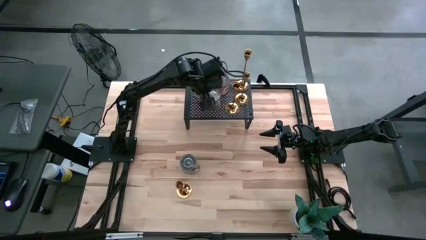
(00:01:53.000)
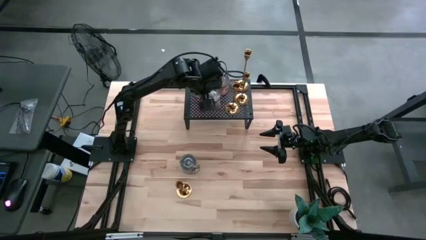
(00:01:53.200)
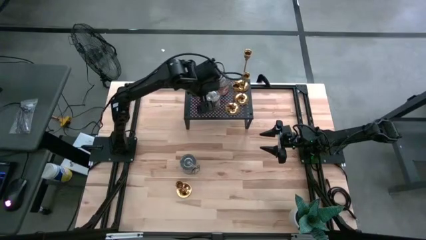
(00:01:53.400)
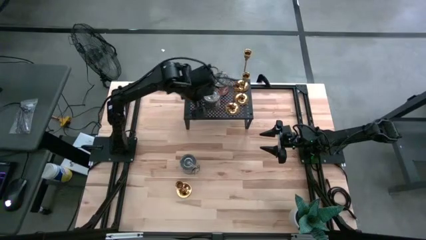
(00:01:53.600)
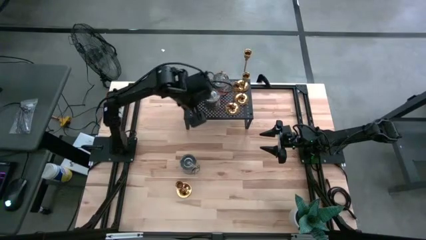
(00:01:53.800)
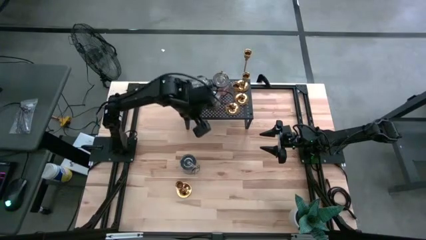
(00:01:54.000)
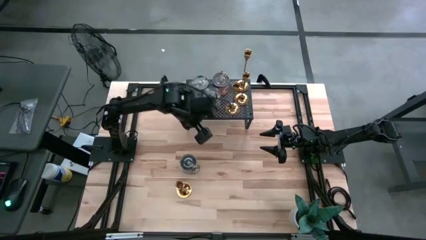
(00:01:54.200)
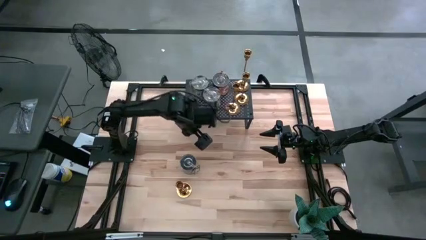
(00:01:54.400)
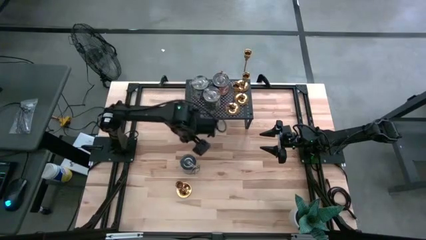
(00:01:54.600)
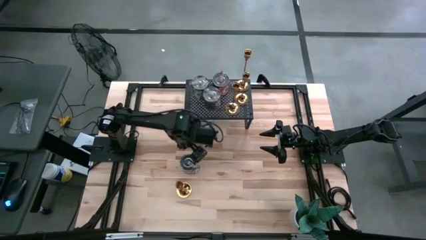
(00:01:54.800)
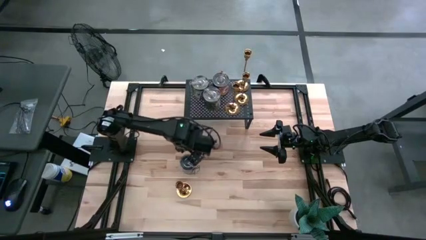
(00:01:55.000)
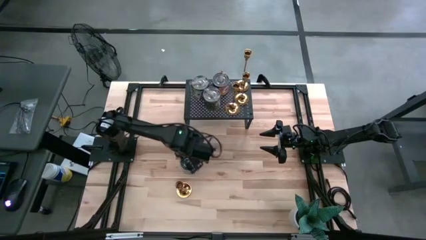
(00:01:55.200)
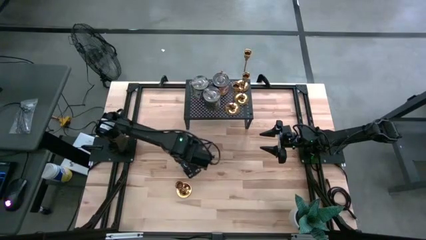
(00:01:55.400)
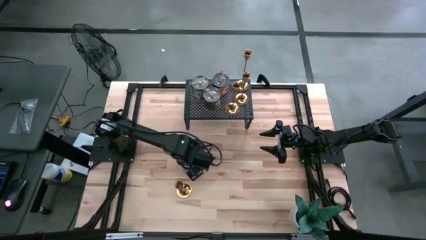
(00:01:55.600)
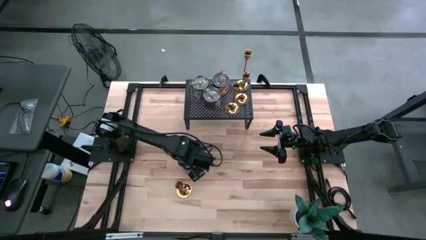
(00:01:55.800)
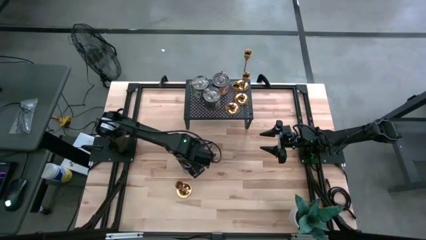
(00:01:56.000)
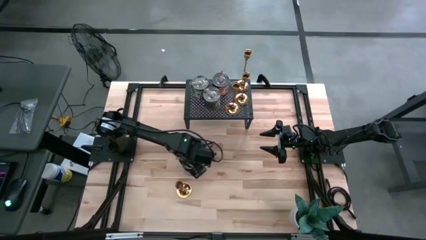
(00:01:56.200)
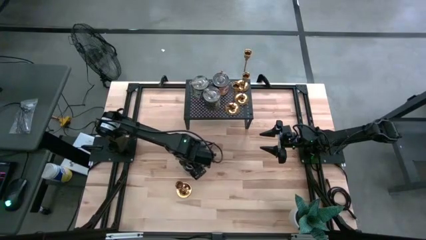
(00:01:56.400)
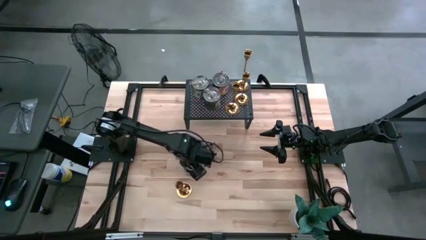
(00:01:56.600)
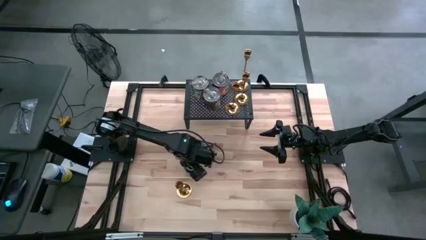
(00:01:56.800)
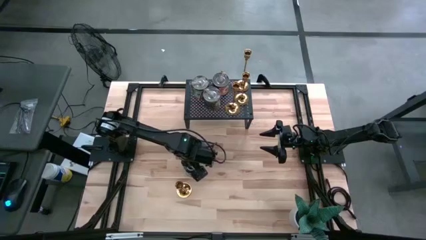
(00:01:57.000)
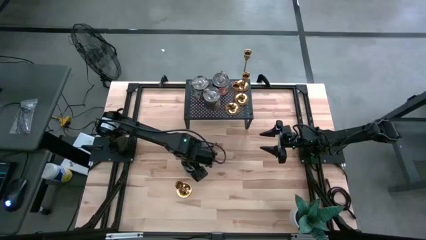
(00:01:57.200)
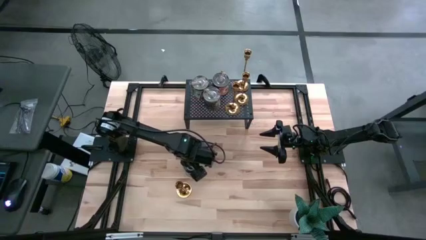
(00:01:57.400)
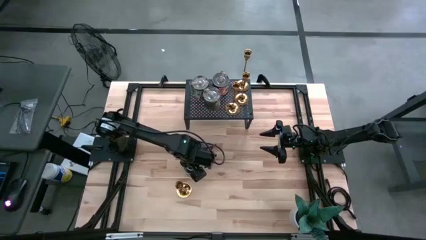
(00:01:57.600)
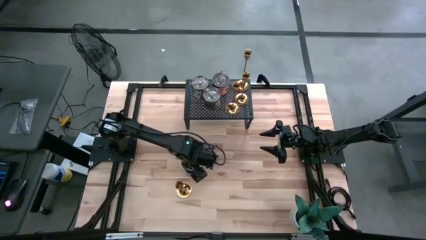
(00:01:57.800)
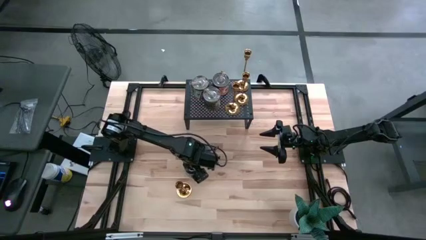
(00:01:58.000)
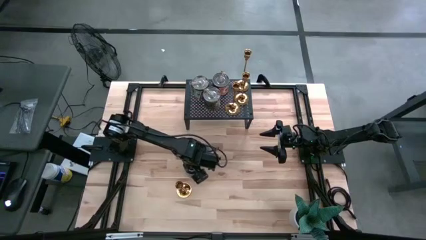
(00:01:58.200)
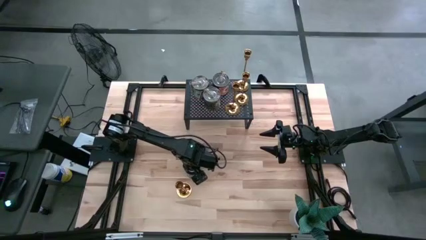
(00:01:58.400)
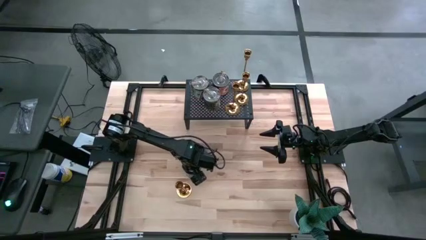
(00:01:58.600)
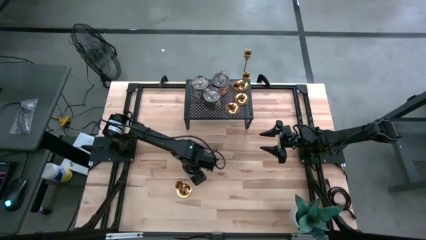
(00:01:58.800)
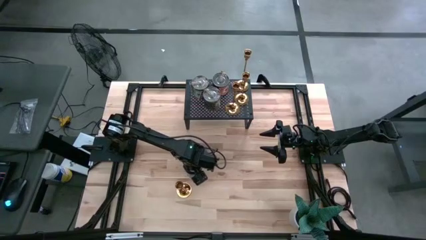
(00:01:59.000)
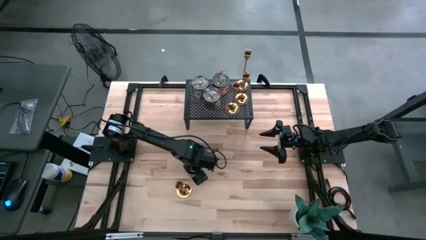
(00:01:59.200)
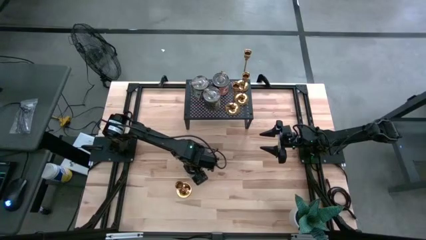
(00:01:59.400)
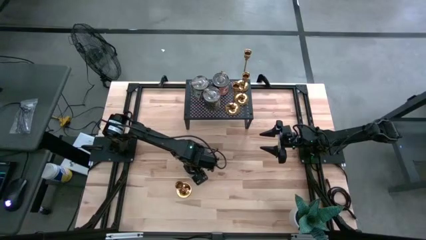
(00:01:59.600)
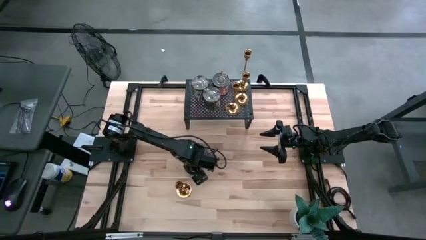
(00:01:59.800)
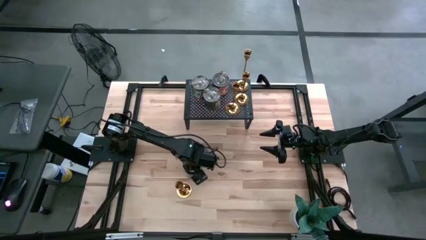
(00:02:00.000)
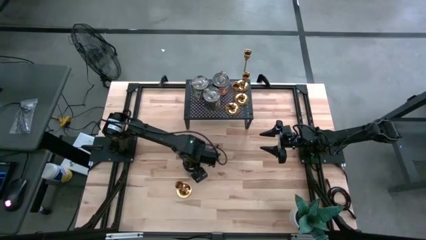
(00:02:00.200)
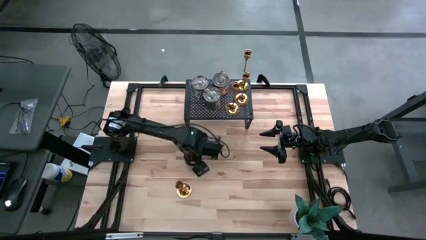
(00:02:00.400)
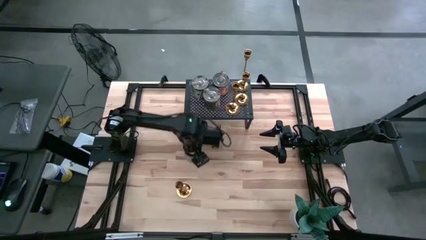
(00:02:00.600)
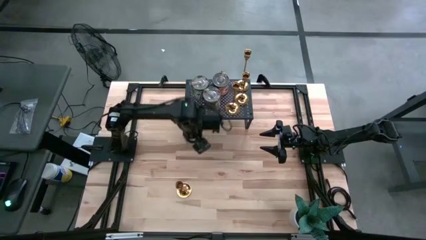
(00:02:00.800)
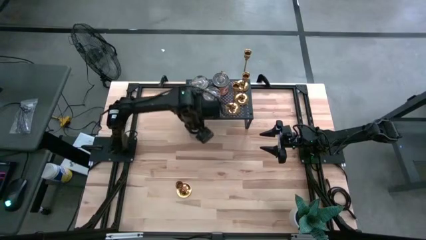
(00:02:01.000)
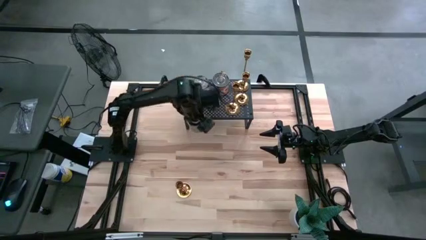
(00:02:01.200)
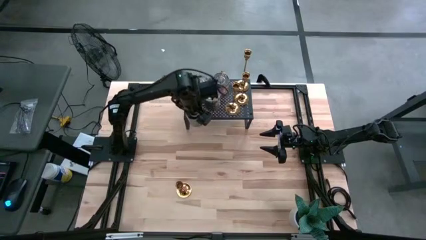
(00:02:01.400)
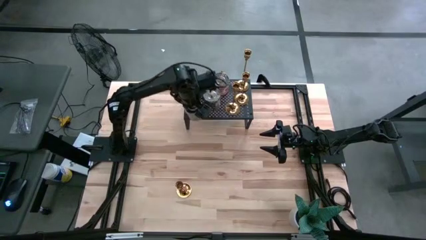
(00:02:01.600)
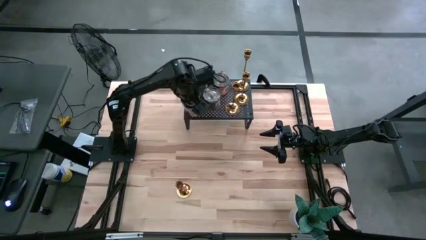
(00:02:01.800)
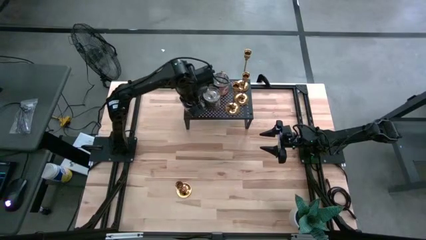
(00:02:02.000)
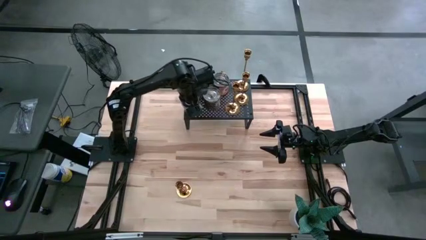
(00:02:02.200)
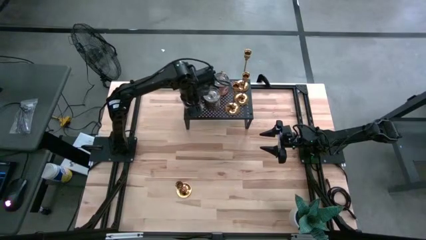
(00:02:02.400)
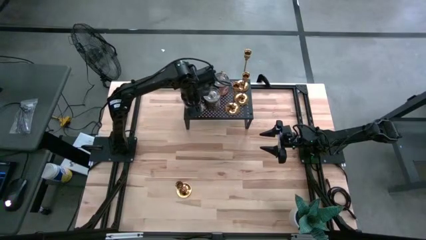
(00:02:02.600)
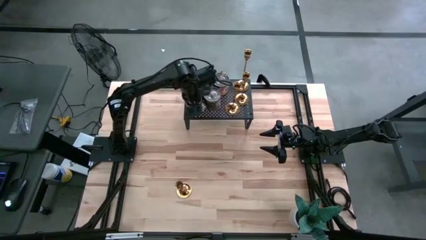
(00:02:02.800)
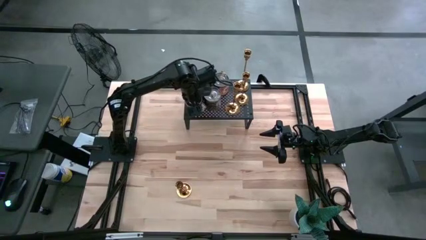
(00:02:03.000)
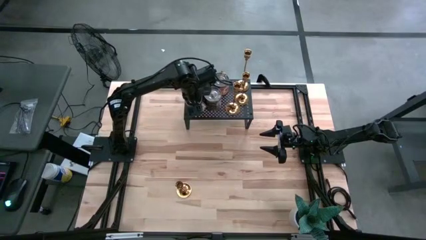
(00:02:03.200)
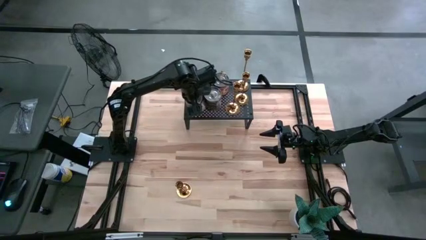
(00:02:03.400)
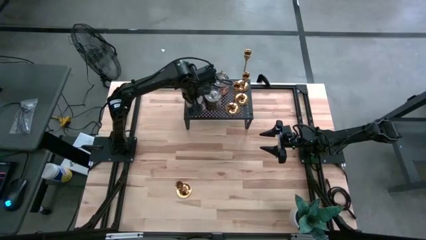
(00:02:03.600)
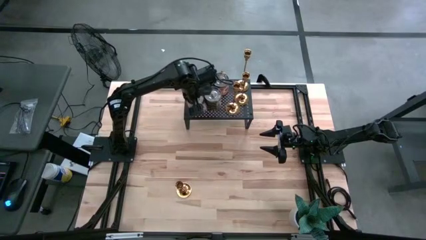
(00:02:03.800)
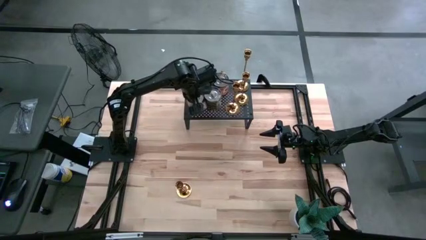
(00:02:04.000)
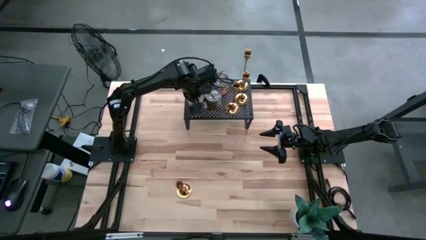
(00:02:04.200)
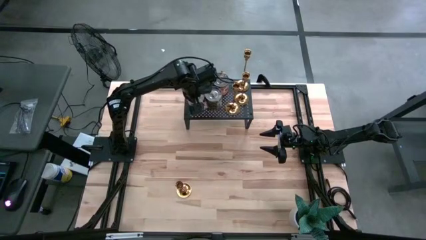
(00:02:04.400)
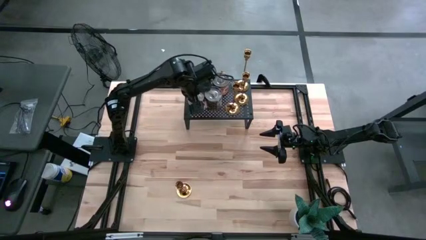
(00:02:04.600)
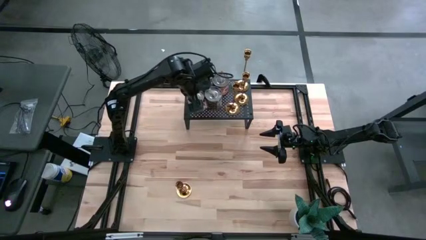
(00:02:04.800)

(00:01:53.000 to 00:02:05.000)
Task: Pick & Place candle stick holders
Align the brown scented candle with the white scented candle on the shelf

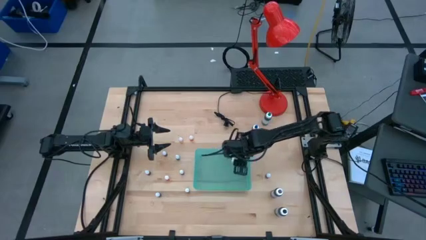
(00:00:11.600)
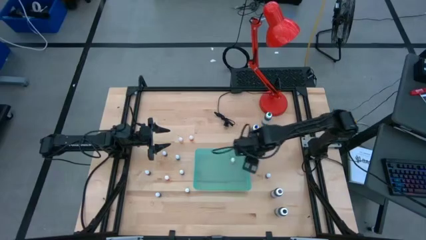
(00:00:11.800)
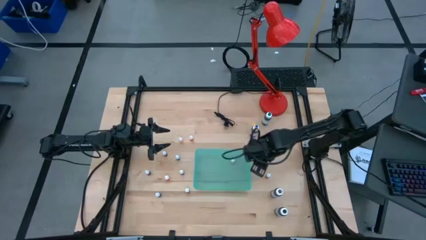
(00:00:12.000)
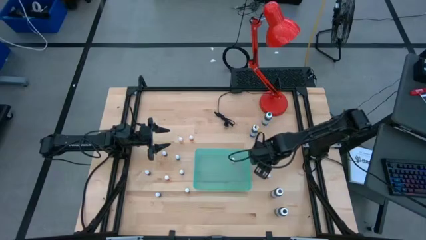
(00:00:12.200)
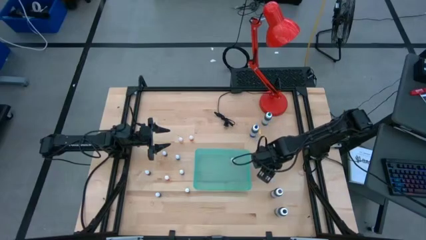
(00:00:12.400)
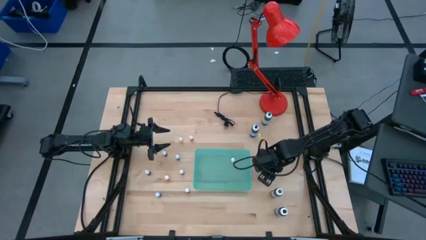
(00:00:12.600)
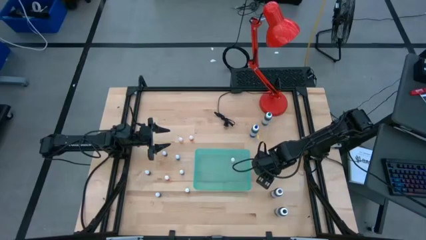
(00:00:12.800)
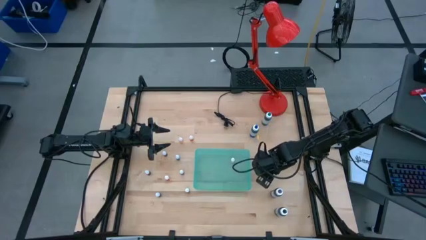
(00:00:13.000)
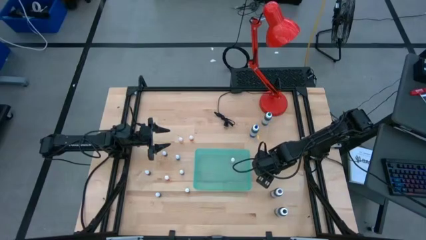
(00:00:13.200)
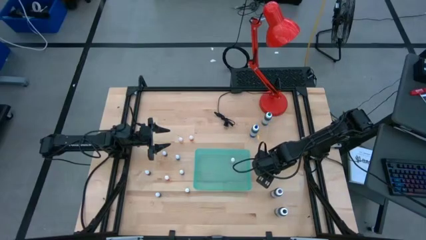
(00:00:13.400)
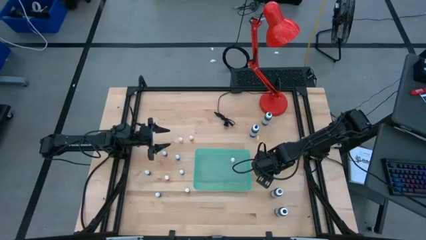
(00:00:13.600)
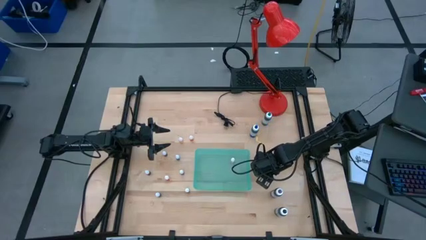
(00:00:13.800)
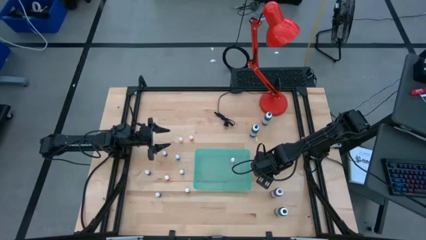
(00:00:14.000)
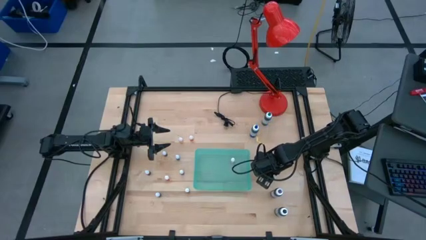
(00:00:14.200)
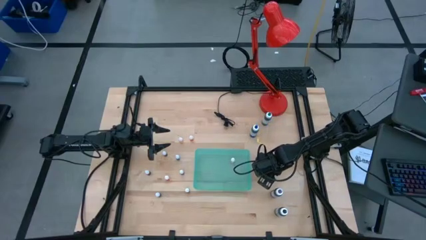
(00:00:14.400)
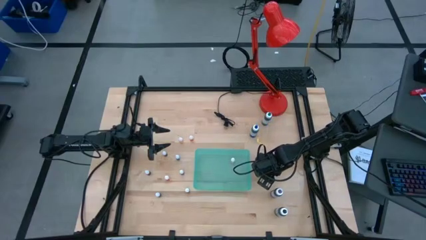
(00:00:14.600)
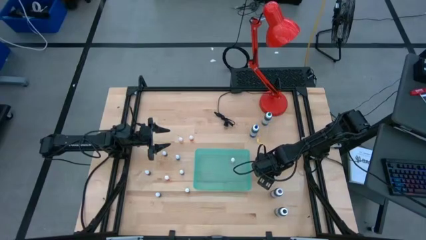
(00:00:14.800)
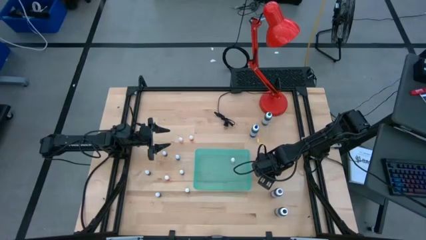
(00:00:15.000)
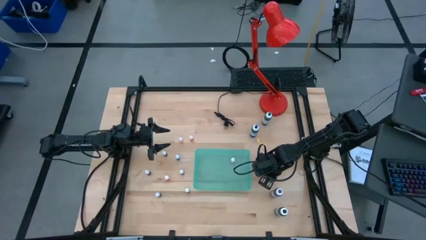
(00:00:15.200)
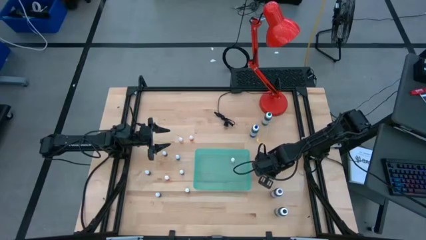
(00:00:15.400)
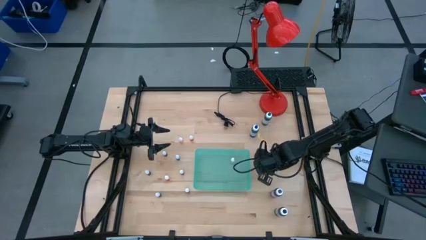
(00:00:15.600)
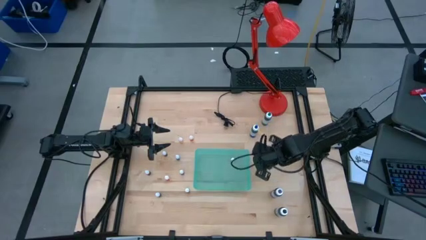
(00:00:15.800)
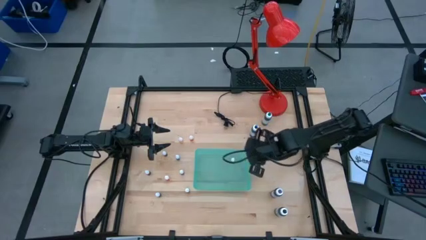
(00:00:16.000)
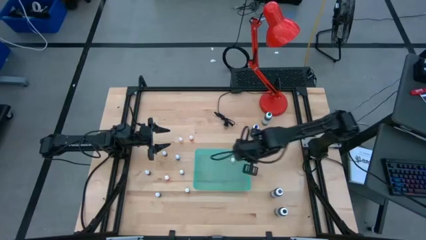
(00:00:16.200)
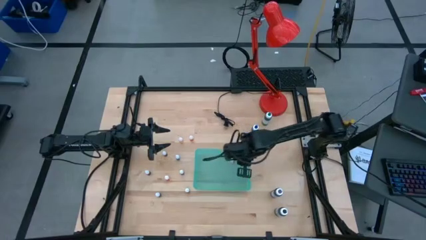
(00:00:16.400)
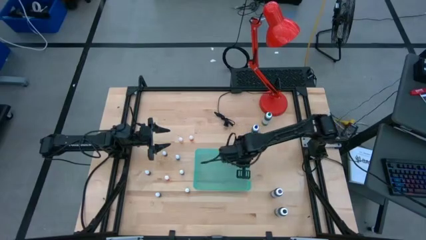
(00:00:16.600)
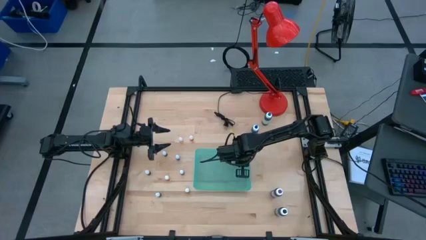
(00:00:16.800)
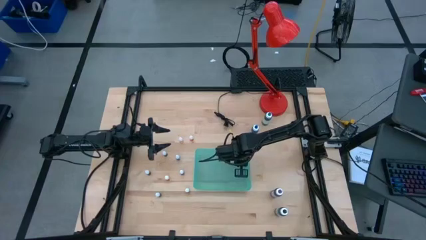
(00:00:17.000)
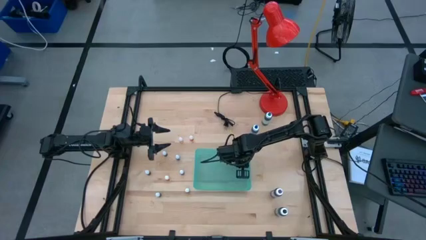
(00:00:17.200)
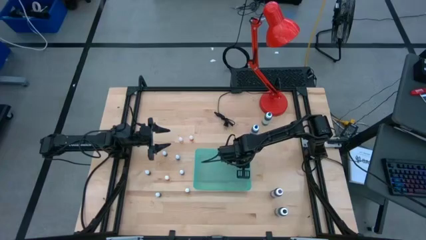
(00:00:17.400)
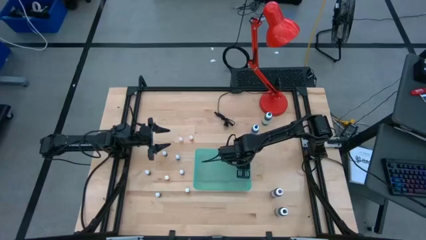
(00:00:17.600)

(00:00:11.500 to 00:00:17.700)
Task: Pick & Place food coloring
Put the small violet food coloring bottle into the light blue bin
